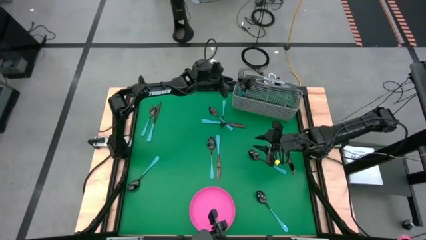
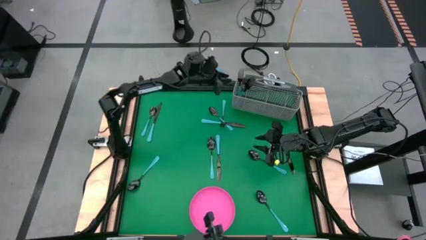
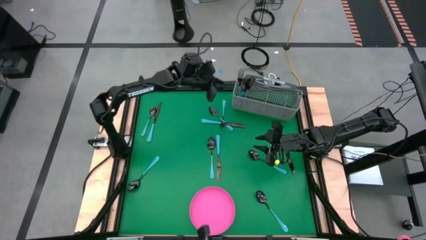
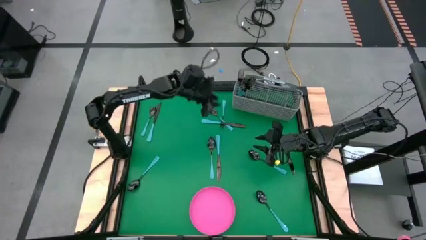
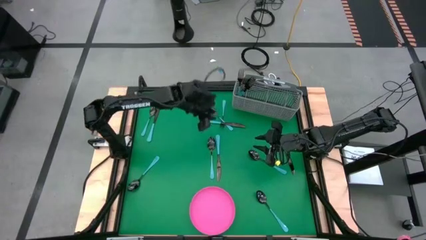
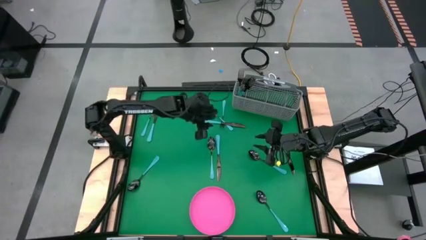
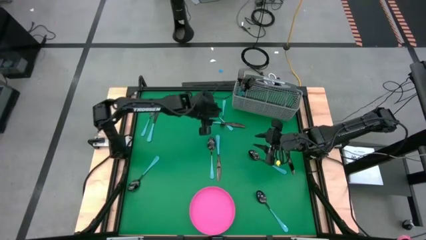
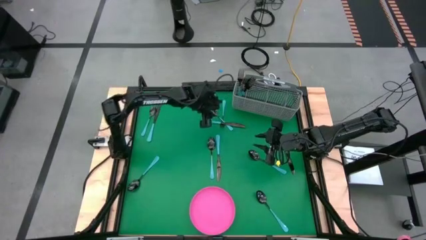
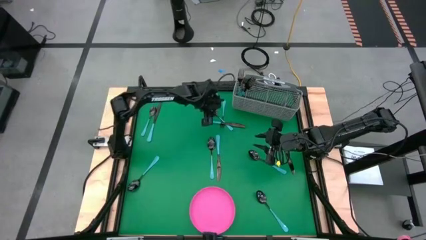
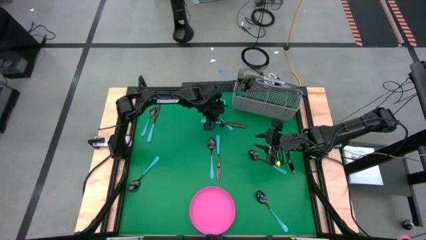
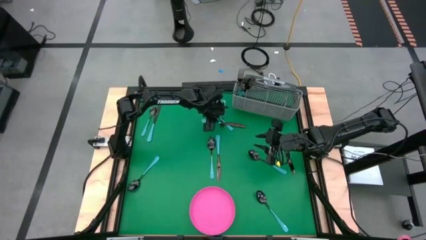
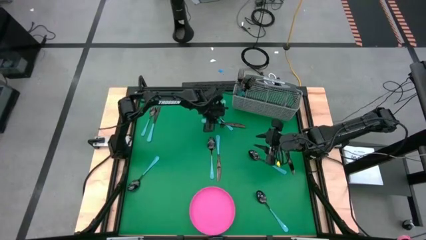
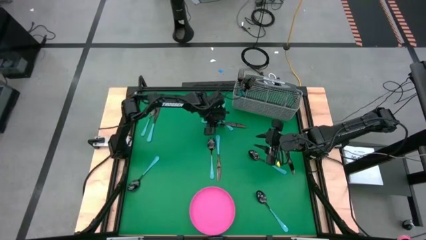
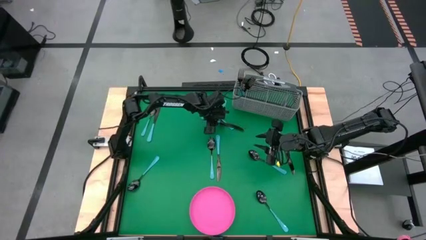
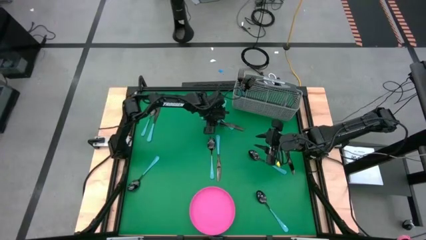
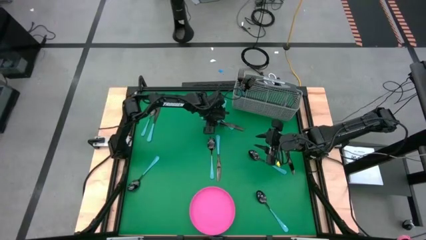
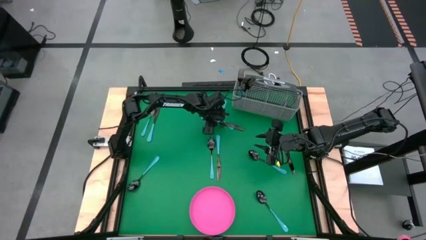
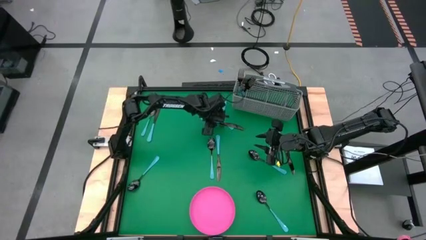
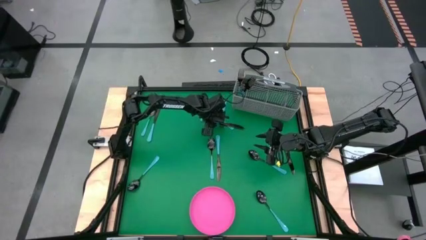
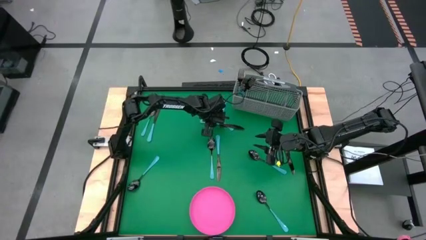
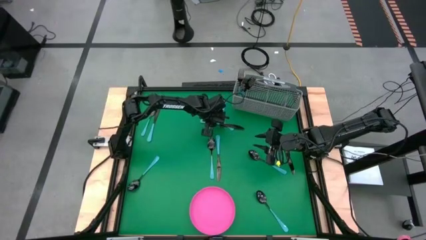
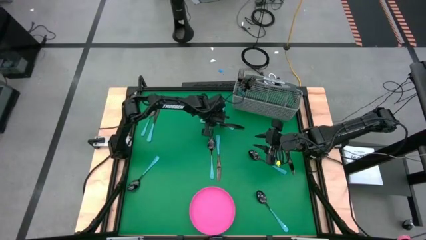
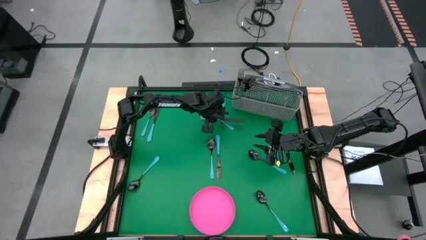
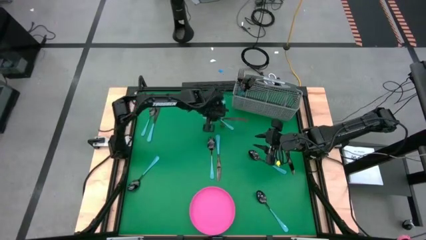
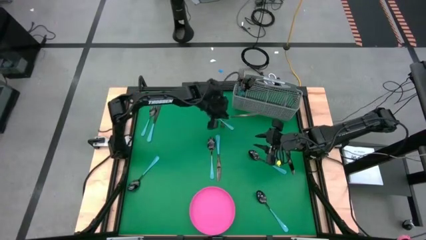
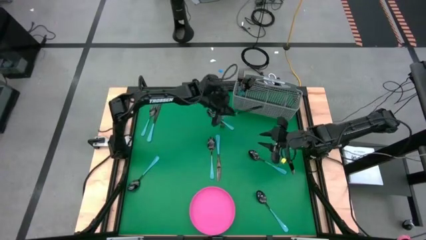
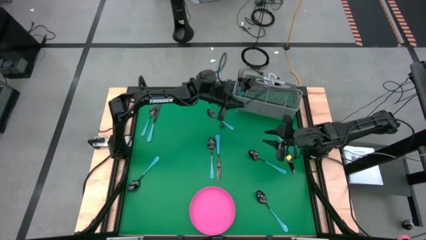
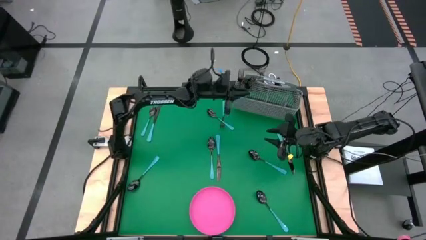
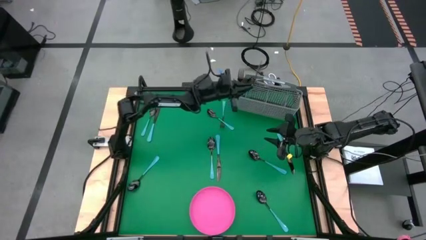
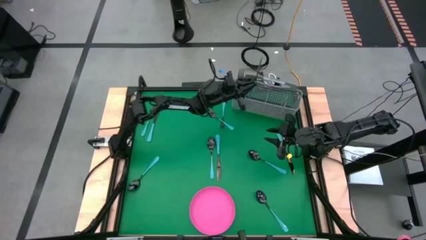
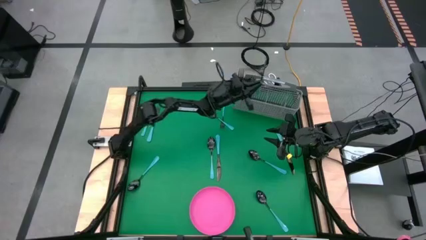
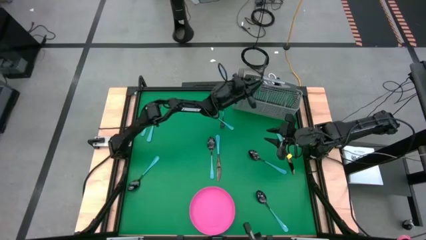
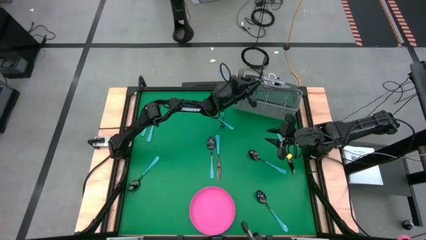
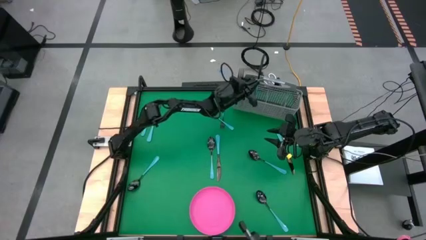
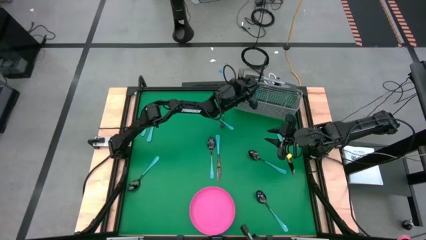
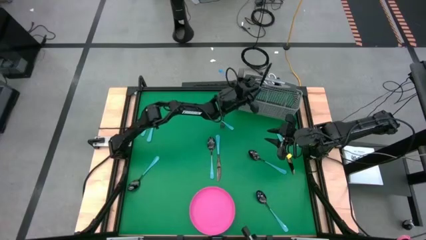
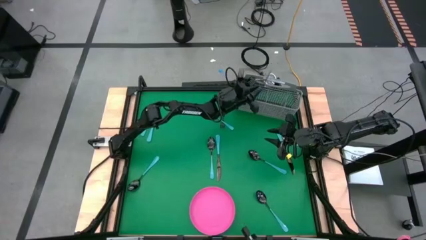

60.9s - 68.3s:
Task: Sort silverware
Put the blue knife into the utensil holder

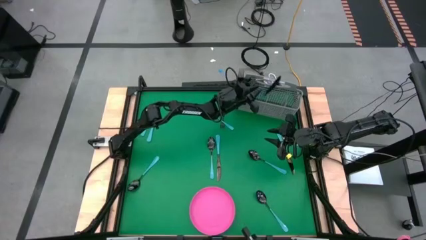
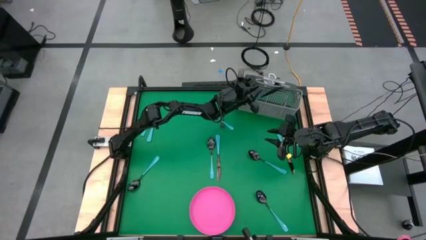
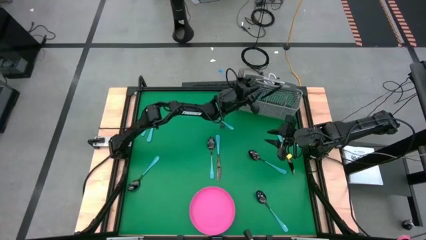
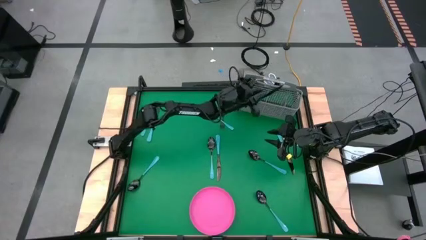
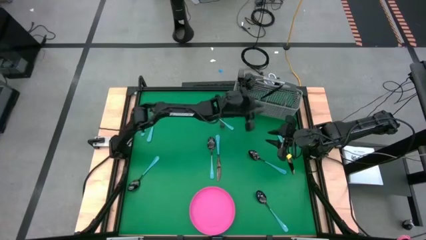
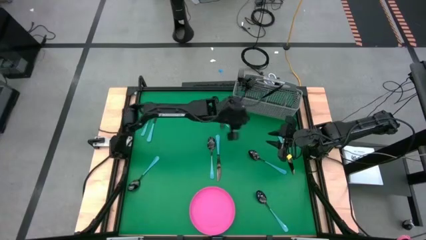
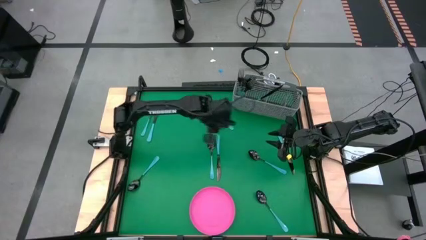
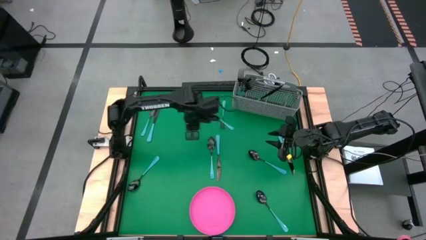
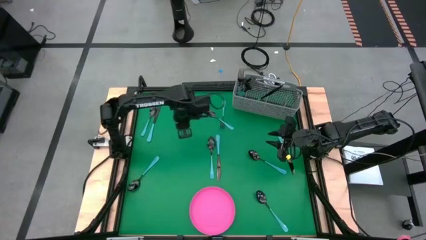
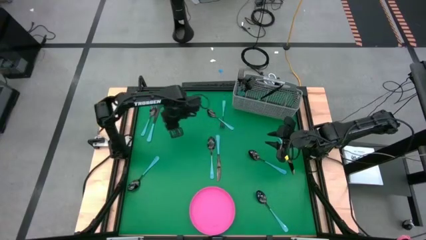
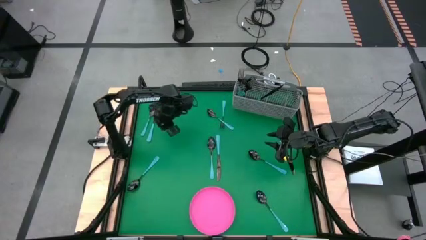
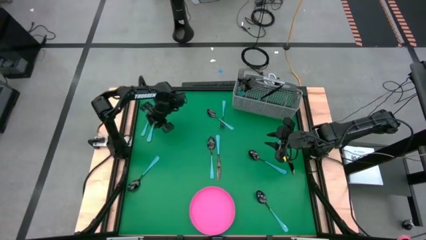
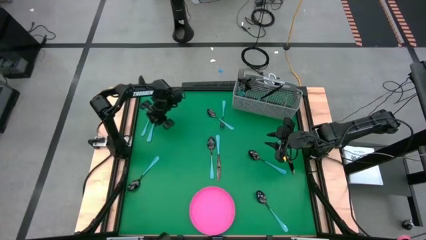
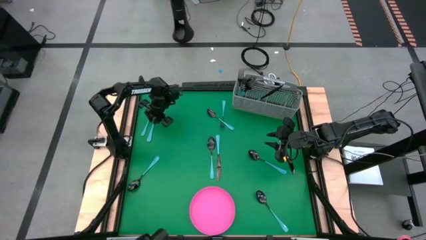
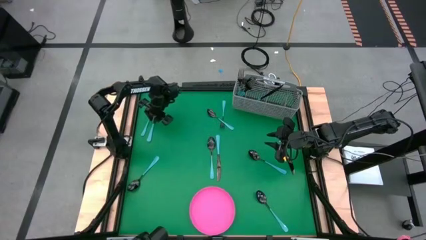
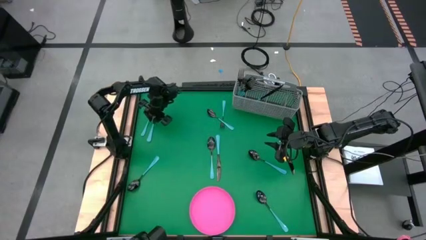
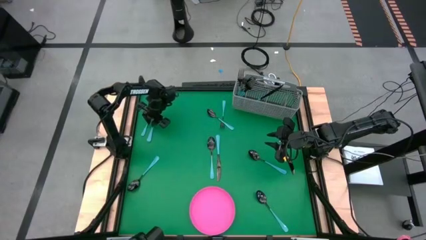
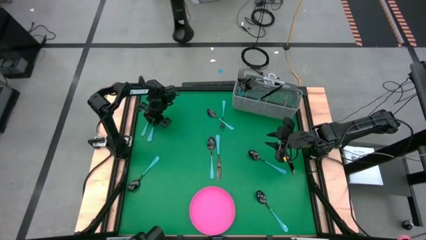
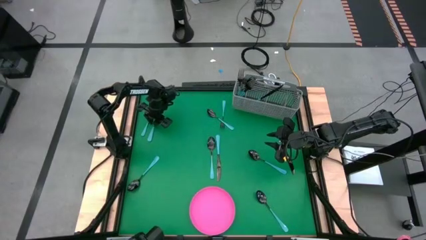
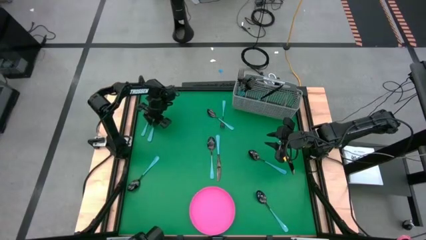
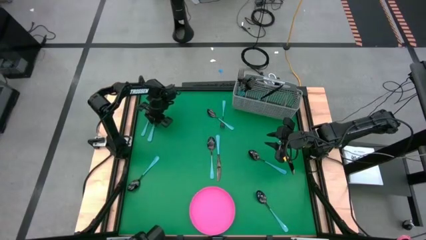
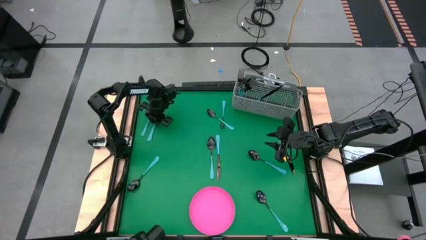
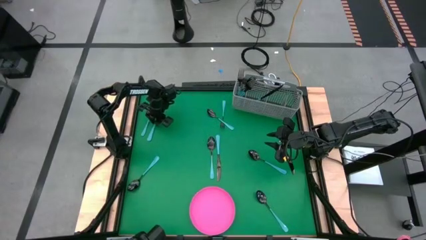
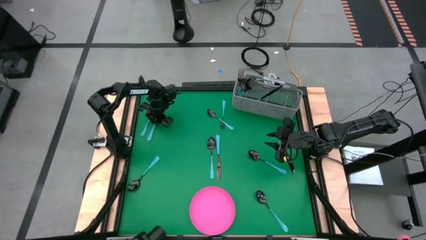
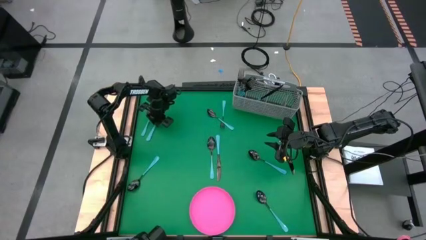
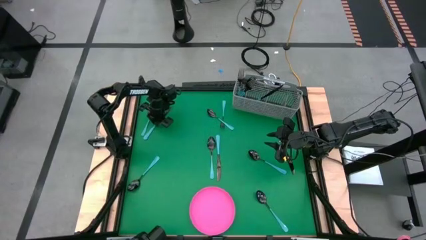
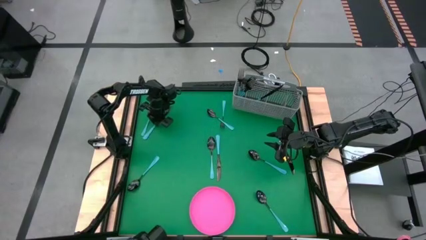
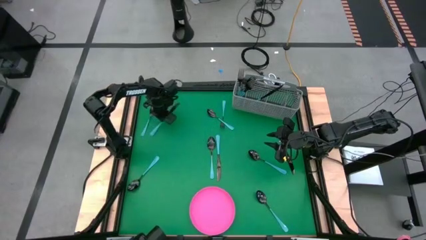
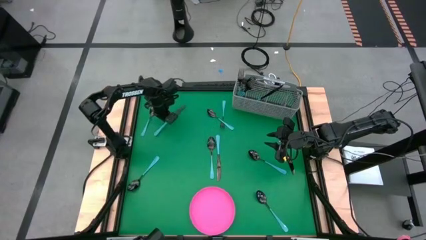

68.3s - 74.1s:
Put the blue knife into the utensil holder

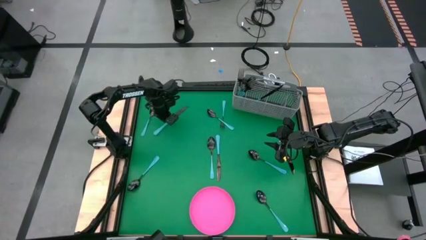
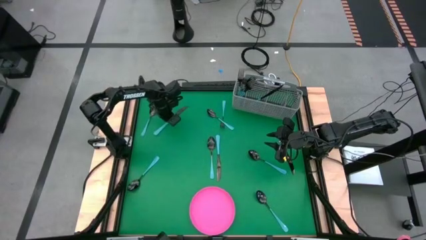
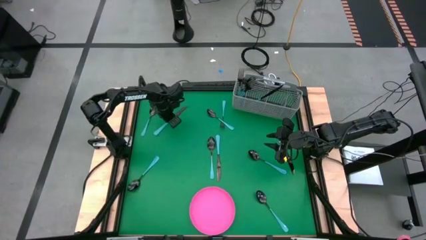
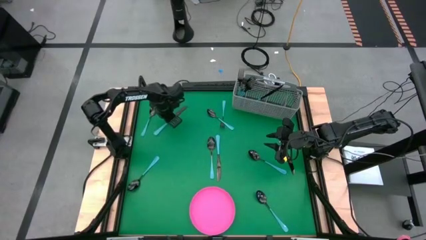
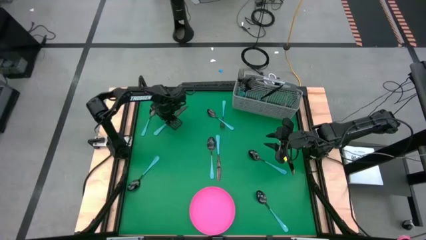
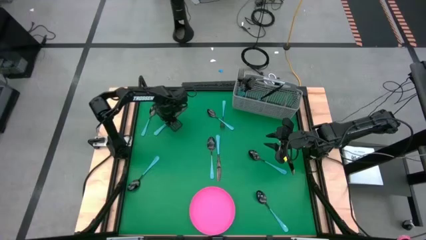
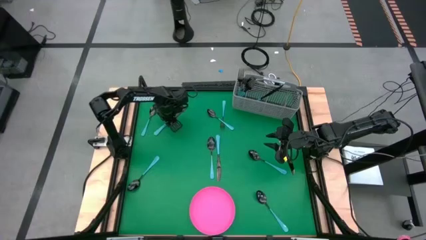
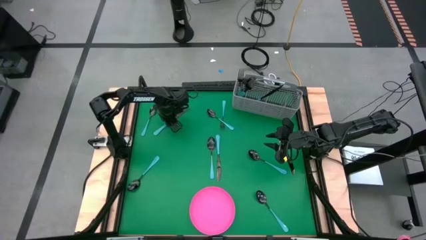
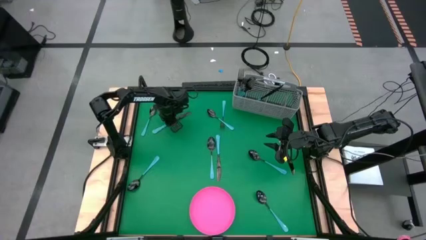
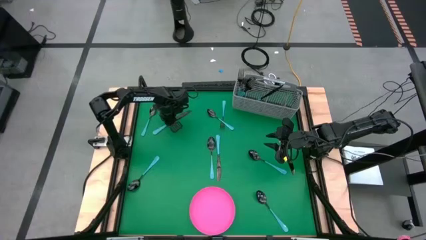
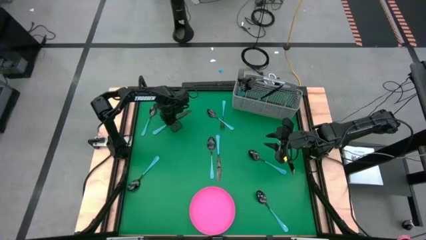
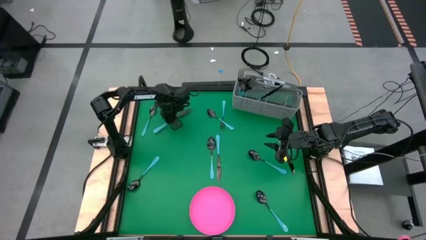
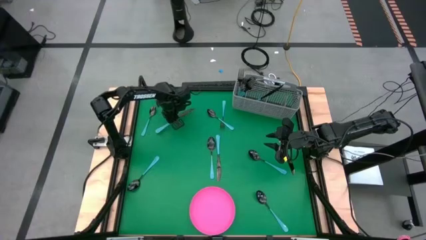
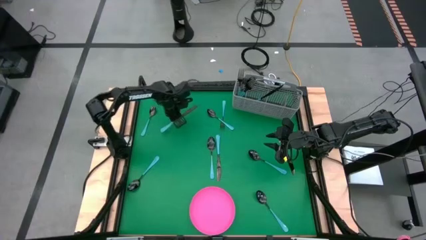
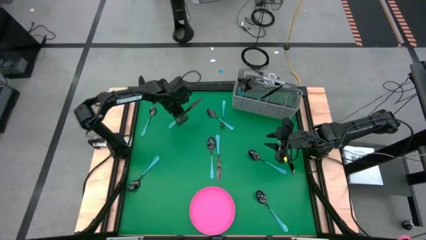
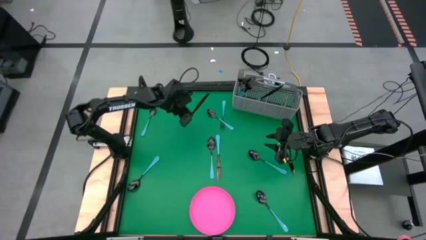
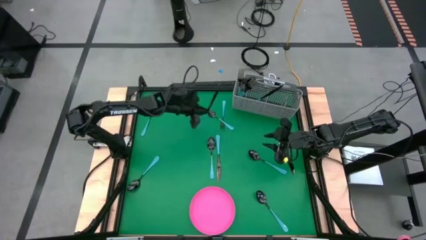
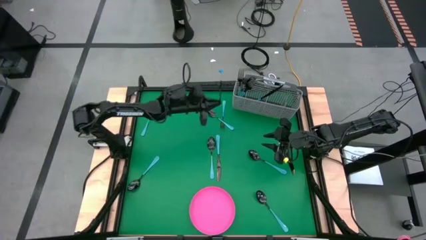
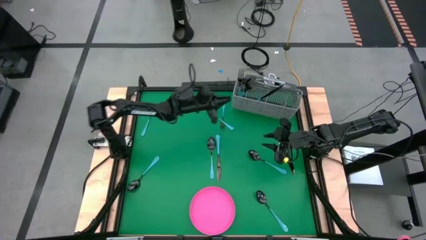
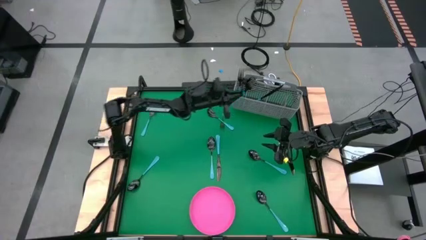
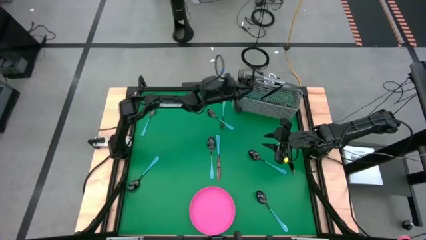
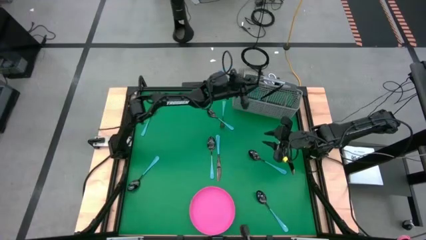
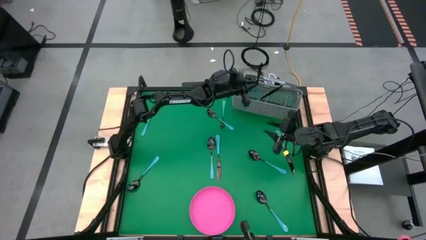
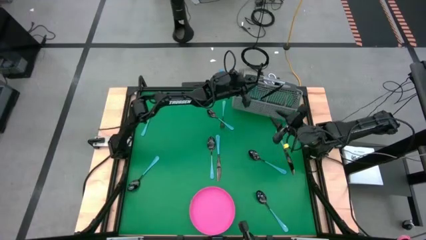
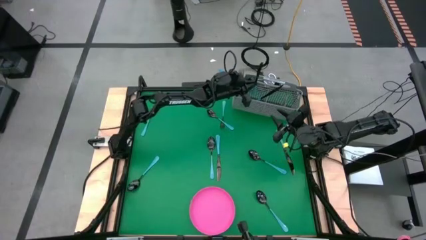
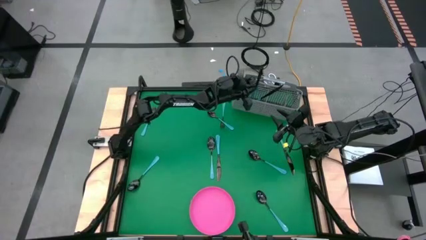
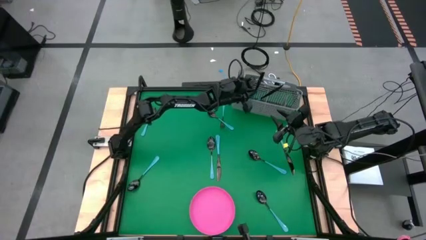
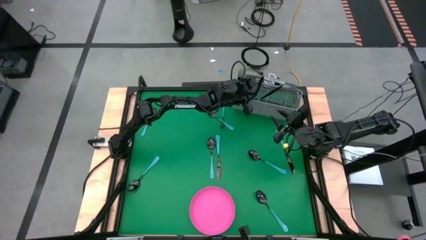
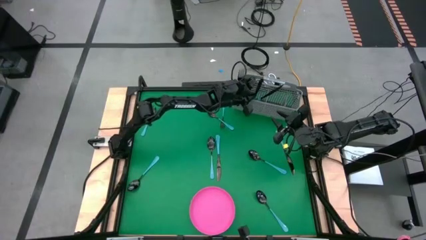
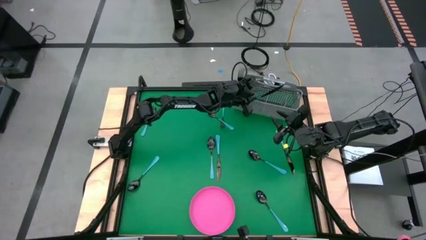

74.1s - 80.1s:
Put the blue knife into the utensil holder
